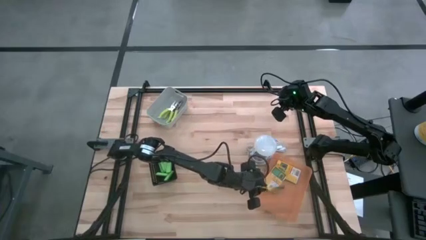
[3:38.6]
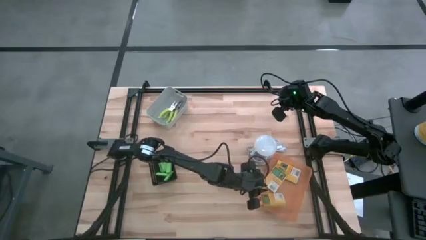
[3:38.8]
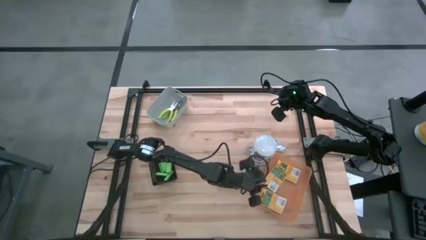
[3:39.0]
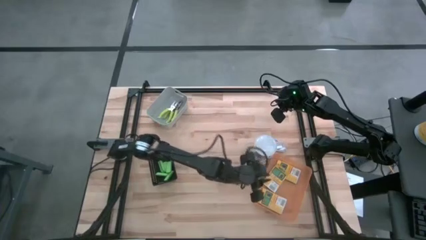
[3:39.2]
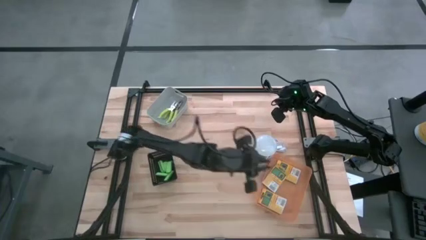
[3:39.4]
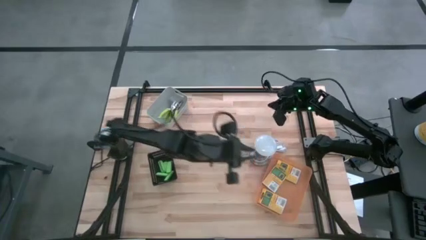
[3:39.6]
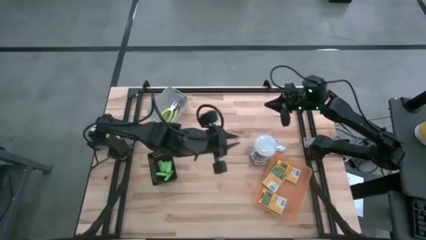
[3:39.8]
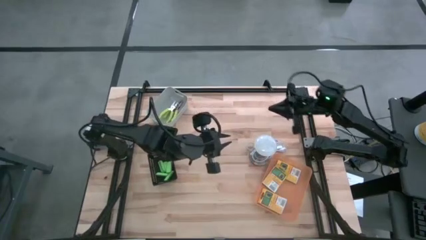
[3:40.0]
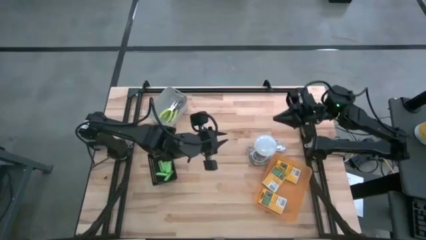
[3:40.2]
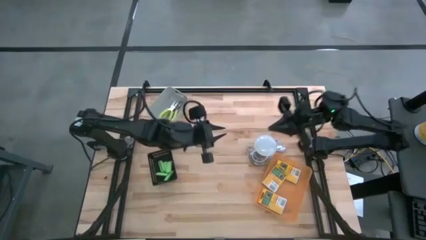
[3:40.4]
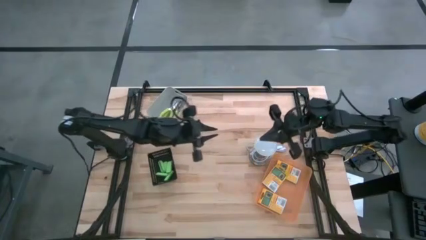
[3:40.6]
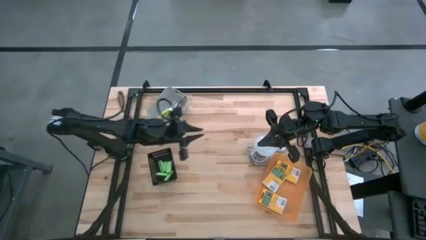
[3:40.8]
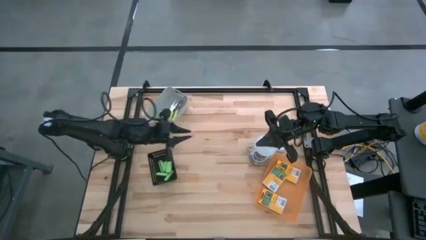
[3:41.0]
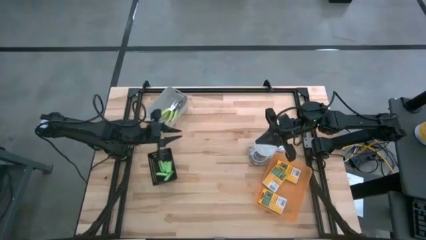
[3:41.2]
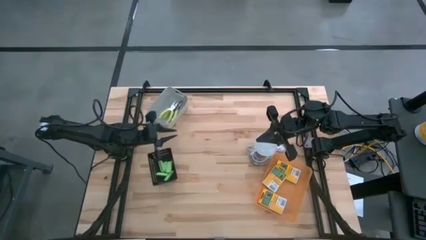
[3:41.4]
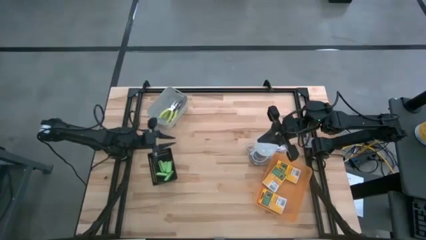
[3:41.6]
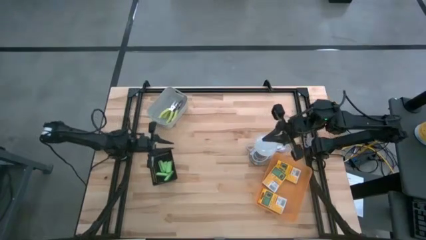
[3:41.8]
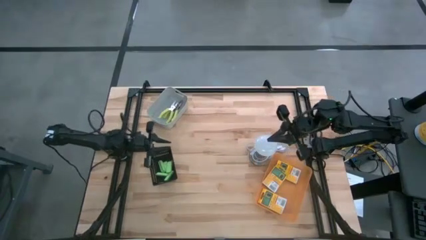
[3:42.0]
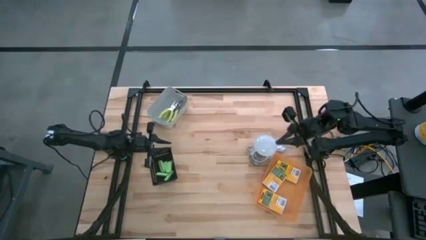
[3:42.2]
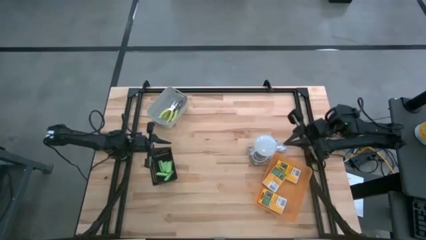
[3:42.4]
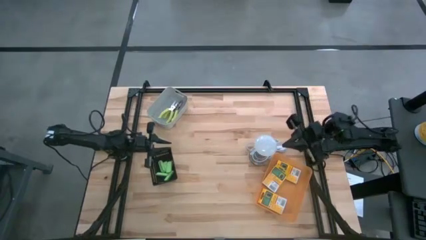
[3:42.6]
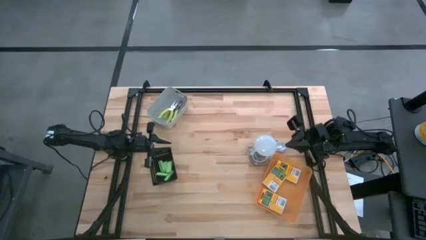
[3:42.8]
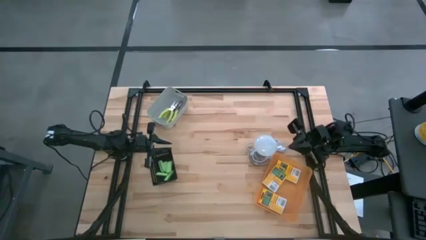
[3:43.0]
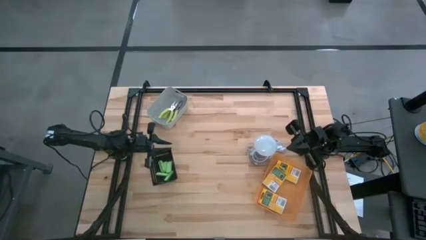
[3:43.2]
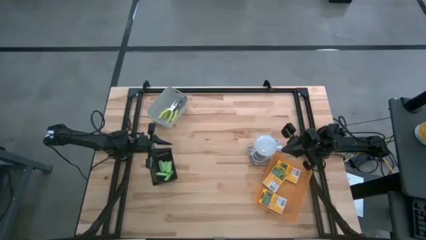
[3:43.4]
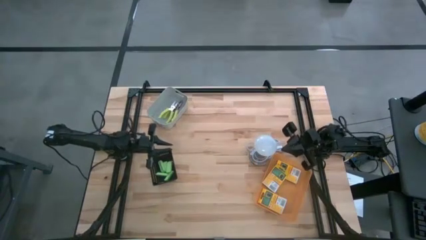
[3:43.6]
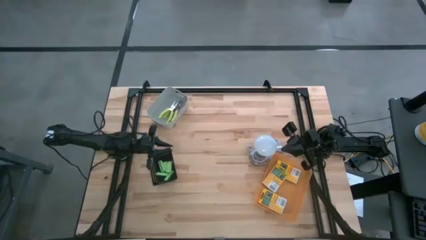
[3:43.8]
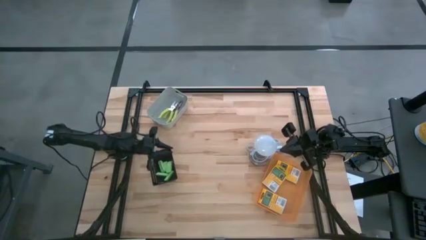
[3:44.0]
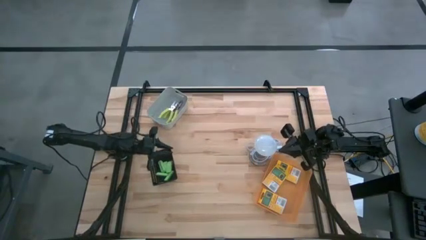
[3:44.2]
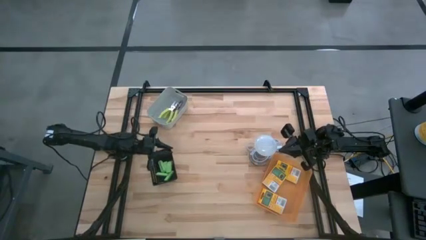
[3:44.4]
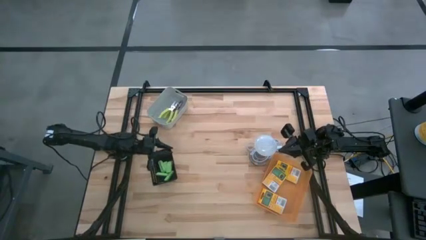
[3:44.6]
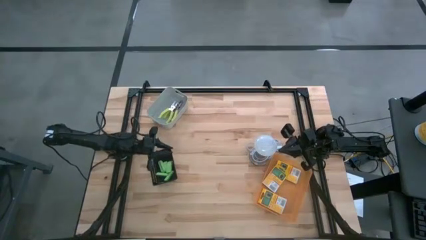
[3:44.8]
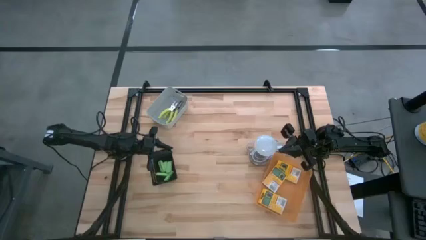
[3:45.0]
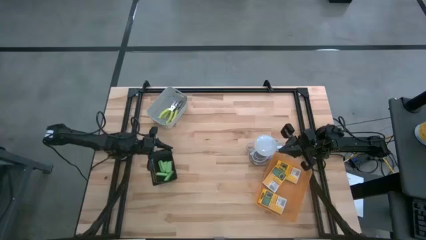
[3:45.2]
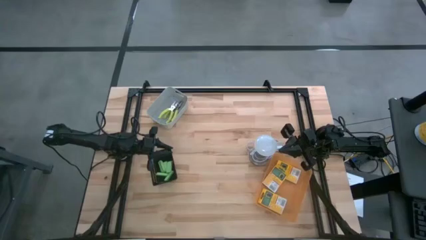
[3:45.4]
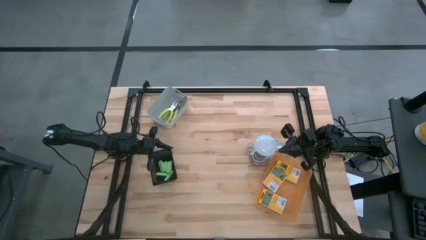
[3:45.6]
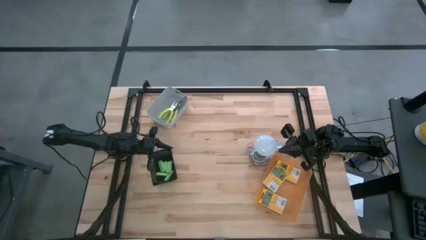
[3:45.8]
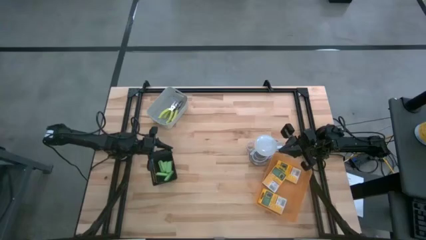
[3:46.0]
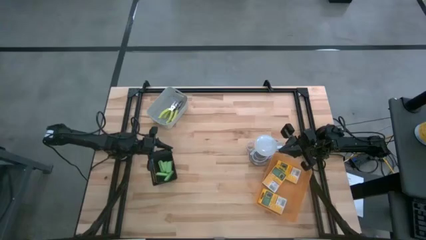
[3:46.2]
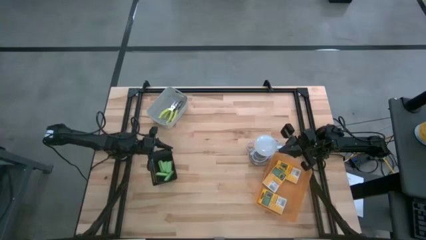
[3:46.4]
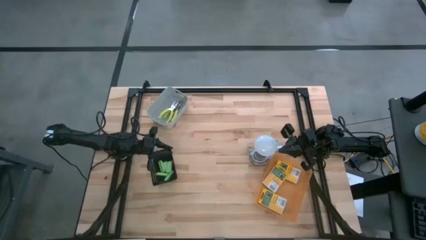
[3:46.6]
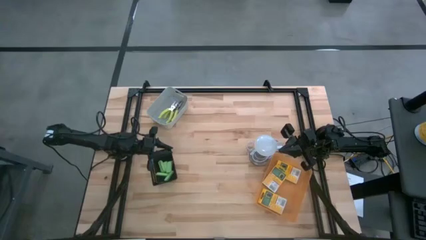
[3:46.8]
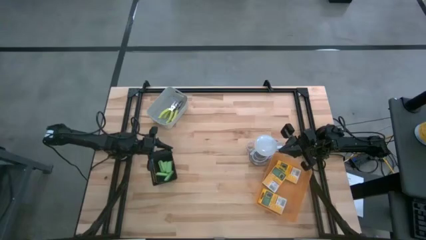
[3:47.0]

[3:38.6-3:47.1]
Task: Pick & Place School Supplies
Return to Home Position

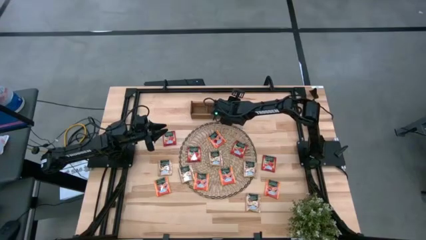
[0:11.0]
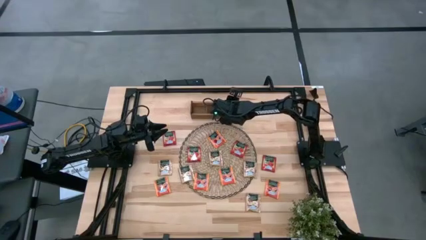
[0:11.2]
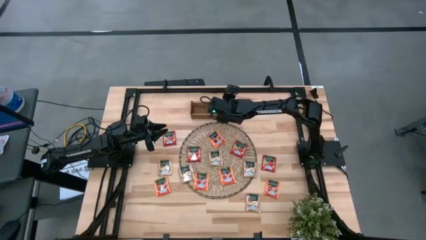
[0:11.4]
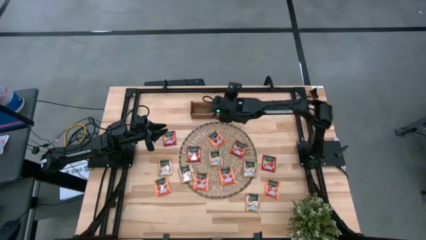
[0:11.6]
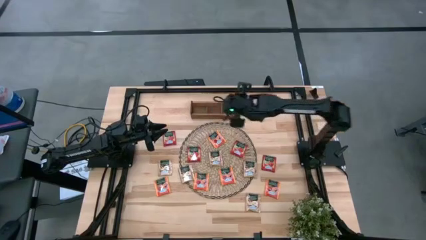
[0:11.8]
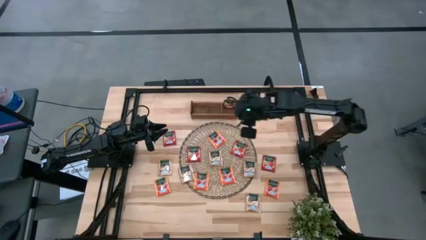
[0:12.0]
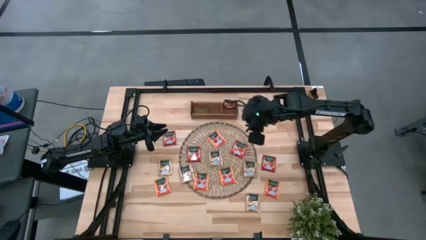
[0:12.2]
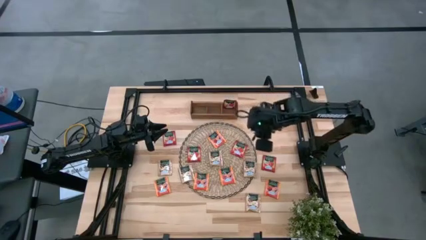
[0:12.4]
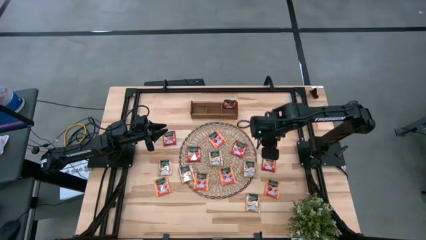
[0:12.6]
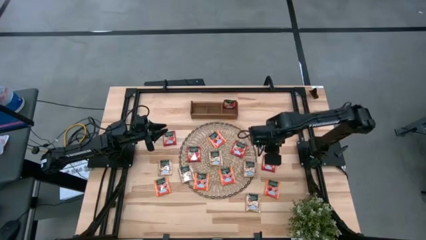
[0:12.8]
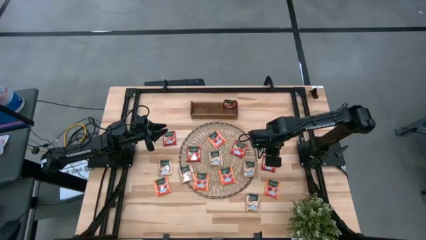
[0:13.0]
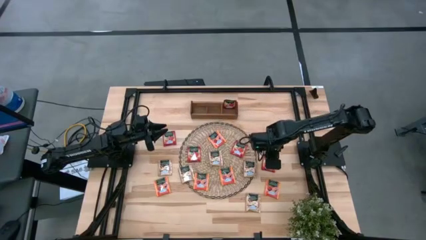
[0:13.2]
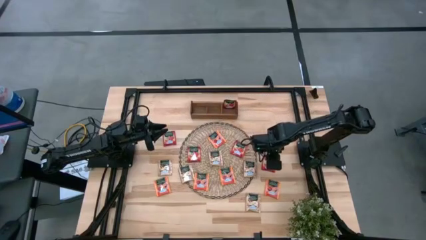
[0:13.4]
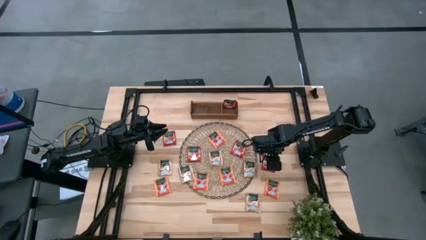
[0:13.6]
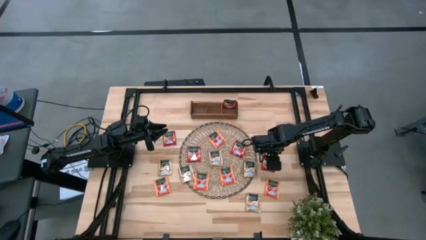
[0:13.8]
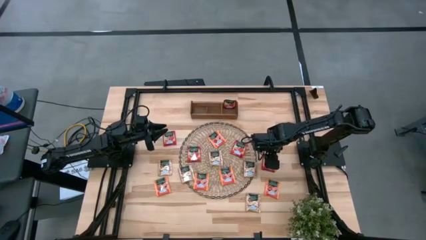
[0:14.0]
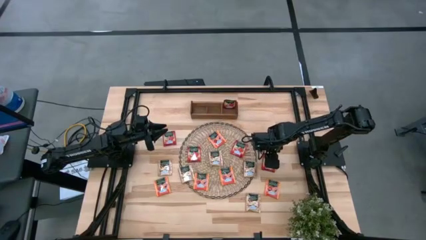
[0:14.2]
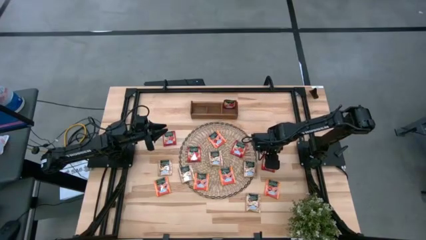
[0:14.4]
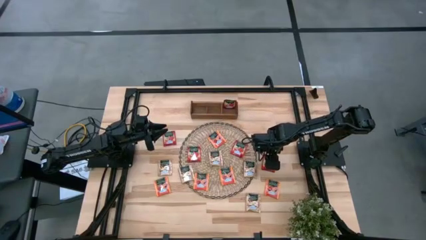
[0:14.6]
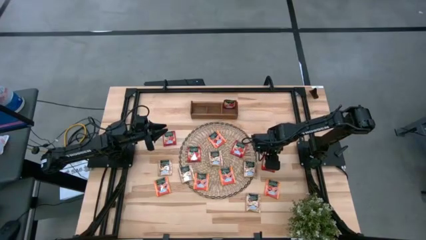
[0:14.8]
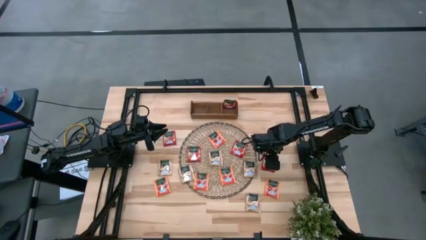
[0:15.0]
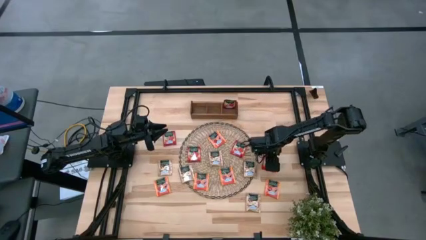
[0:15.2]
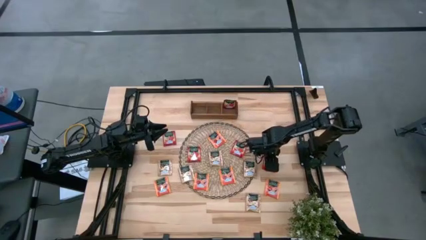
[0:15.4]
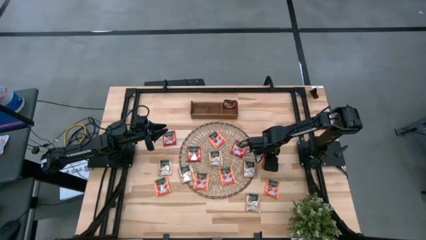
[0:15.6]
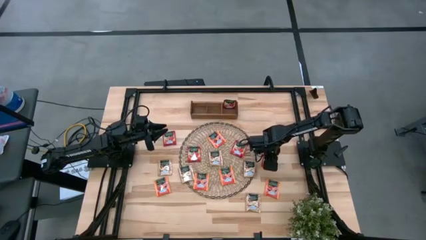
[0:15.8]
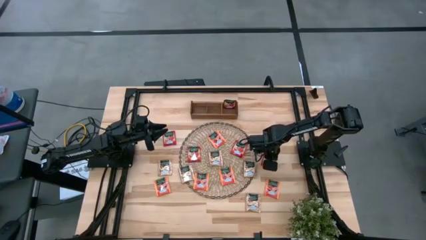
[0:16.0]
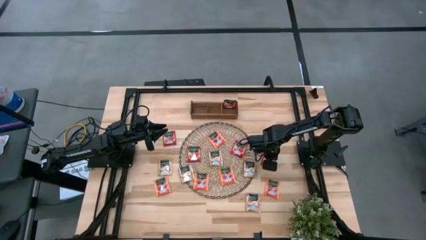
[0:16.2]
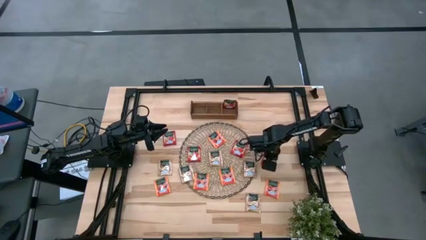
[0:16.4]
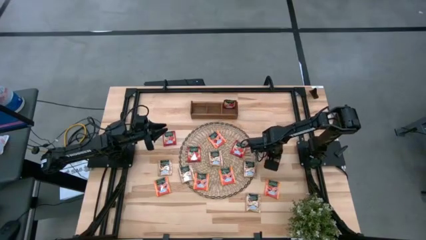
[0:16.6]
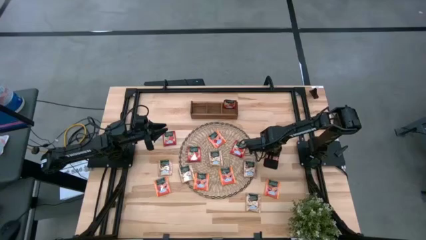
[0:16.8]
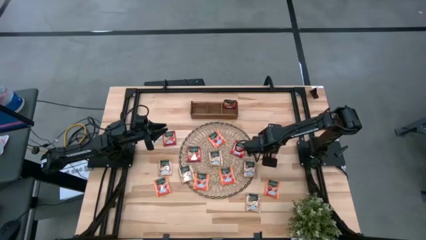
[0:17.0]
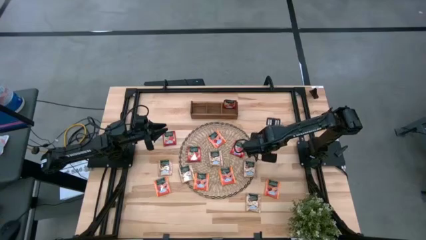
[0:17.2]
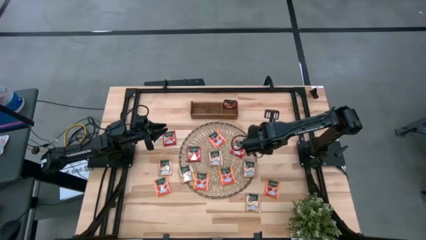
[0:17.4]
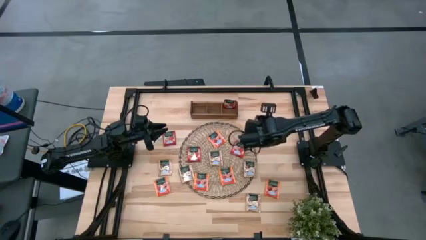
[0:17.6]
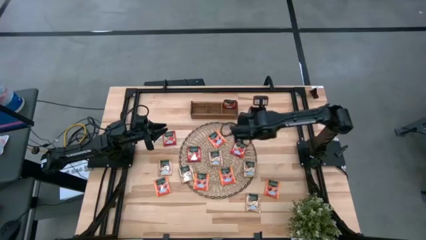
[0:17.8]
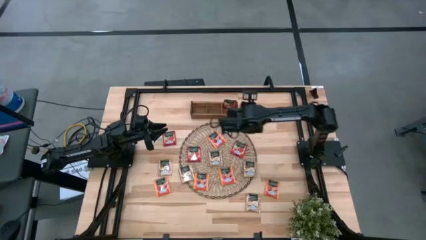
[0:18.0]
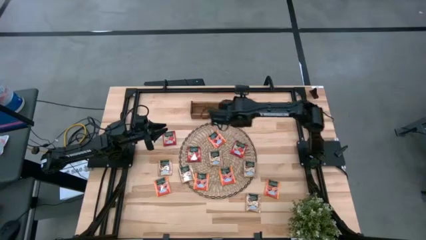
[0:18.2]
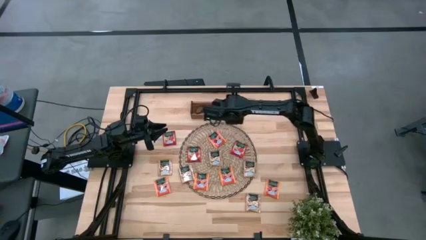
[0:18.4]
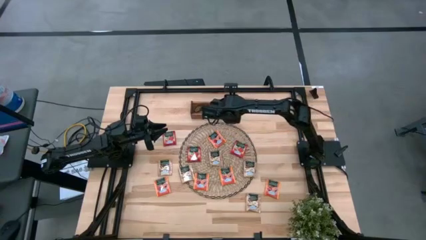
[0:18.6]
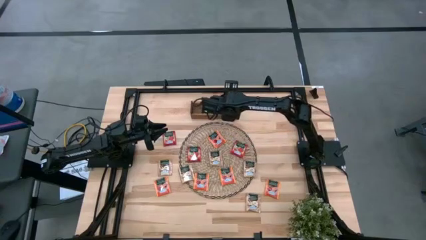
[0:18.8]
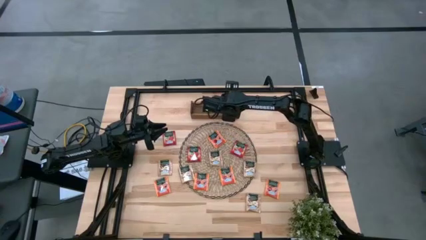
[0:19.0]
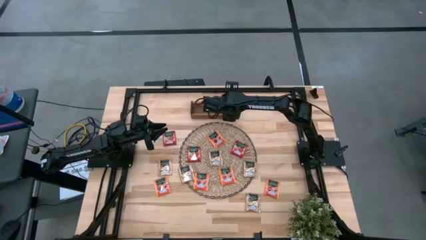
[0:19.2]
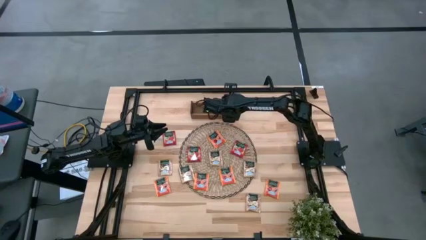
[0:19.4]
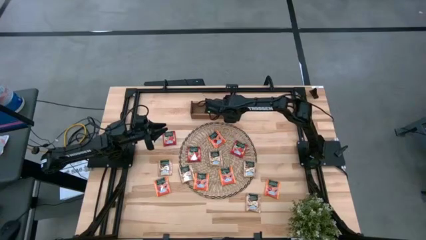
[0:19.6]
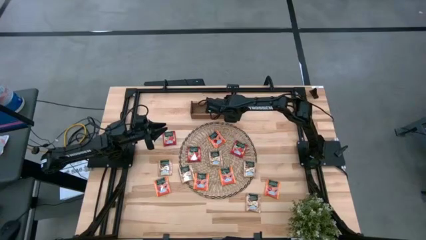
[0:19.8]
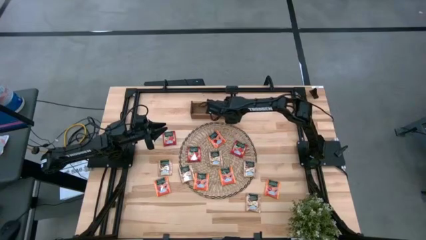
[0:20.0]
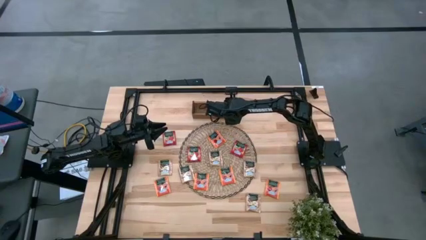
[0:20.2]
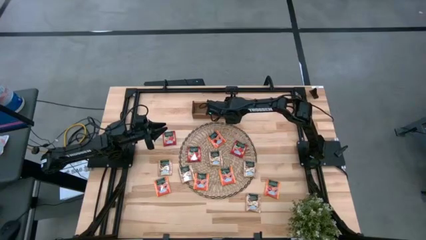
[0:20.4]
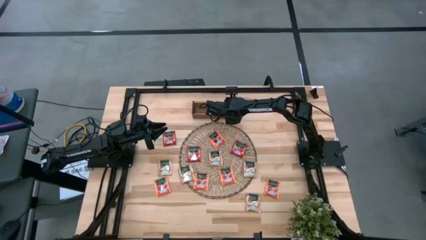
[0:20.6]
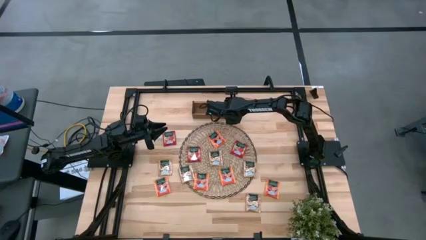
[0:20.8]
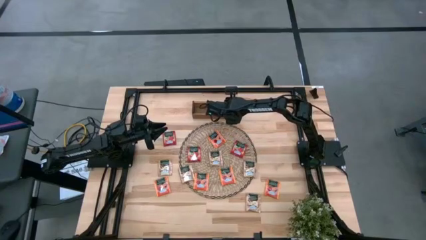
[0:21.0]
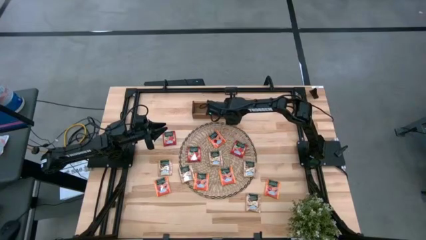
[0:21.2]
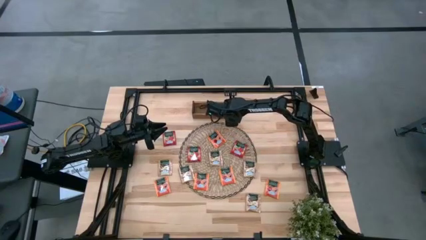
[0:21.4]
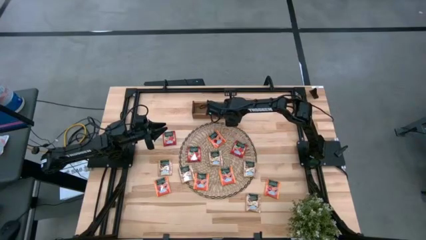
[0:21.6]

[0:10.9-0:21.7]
Task: Pick & Place Tea
Put the red tea bag into the right section of the wooden organizer
